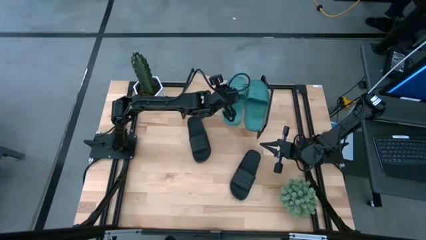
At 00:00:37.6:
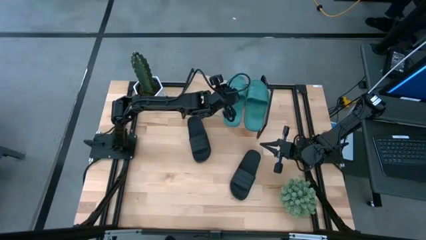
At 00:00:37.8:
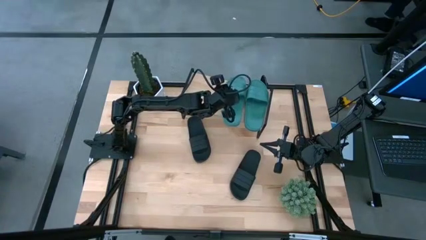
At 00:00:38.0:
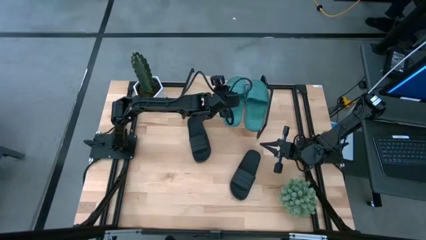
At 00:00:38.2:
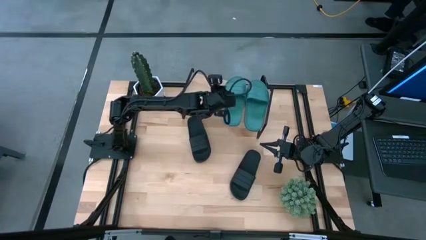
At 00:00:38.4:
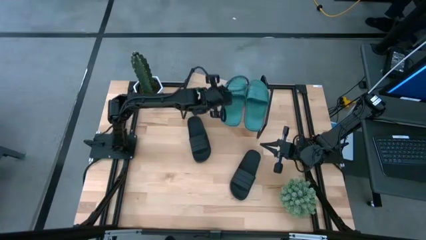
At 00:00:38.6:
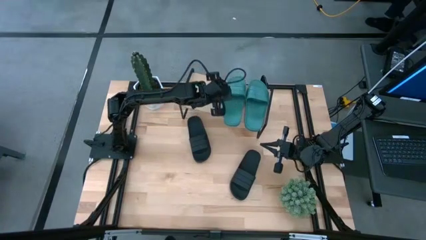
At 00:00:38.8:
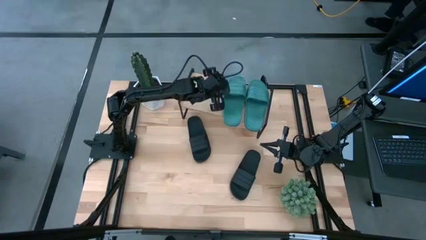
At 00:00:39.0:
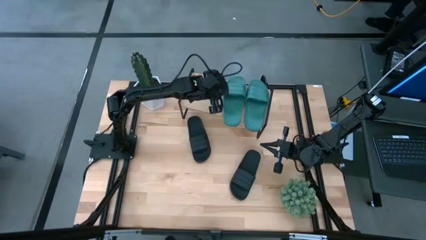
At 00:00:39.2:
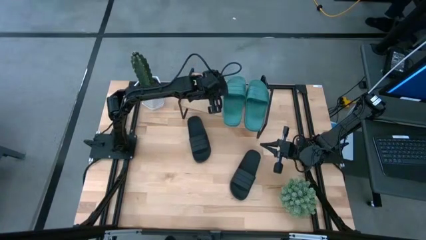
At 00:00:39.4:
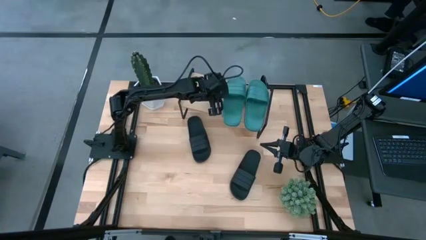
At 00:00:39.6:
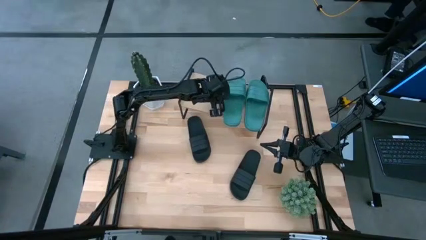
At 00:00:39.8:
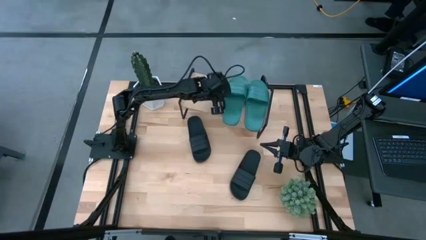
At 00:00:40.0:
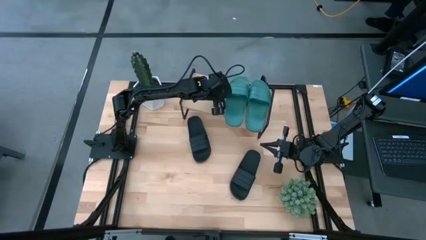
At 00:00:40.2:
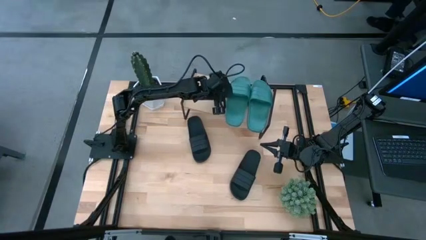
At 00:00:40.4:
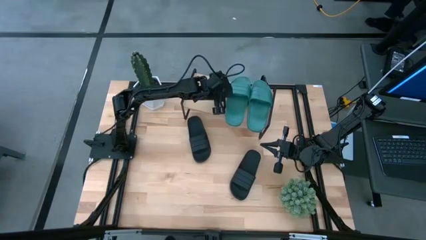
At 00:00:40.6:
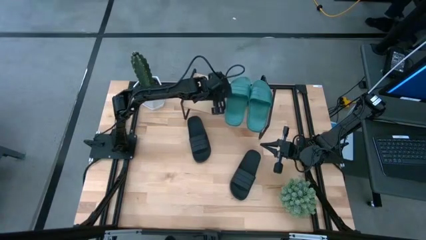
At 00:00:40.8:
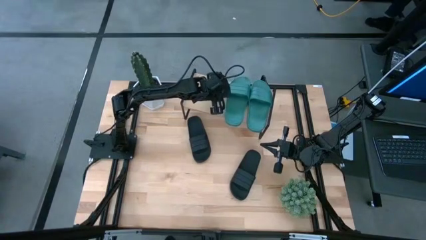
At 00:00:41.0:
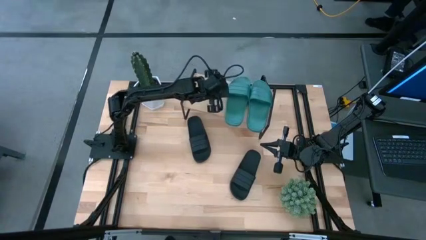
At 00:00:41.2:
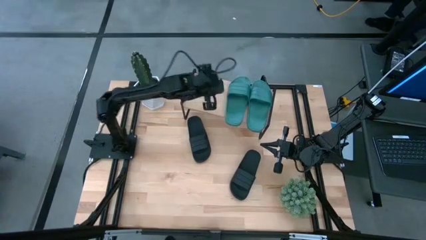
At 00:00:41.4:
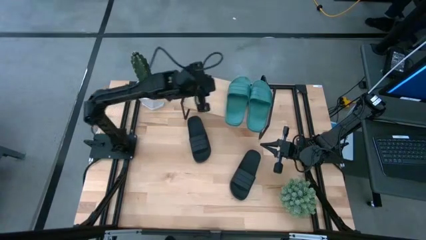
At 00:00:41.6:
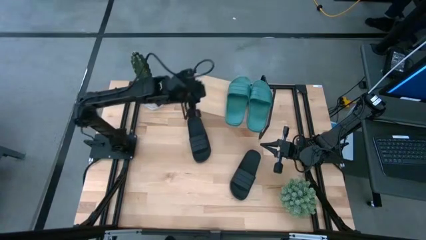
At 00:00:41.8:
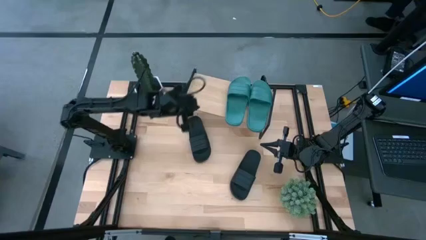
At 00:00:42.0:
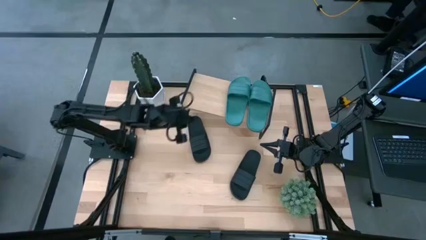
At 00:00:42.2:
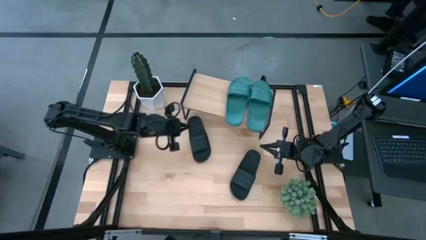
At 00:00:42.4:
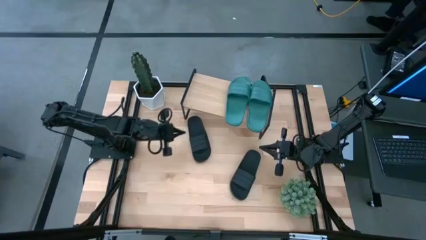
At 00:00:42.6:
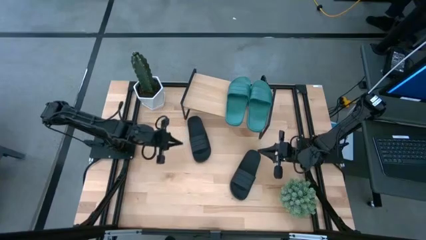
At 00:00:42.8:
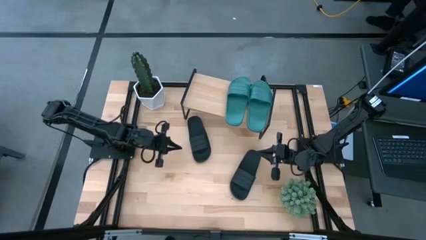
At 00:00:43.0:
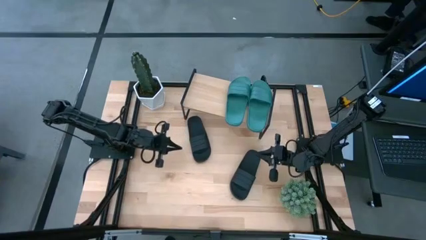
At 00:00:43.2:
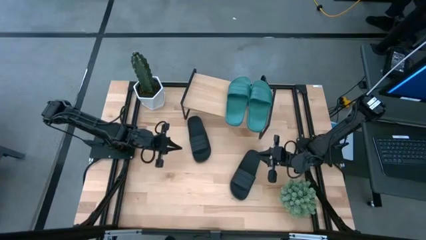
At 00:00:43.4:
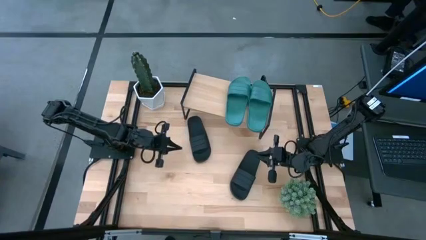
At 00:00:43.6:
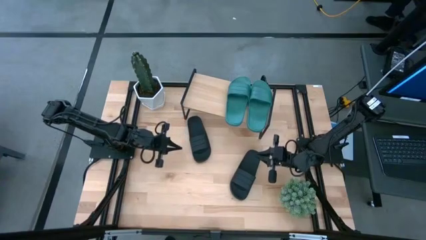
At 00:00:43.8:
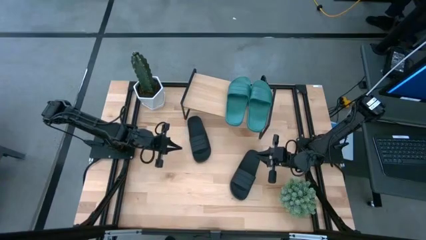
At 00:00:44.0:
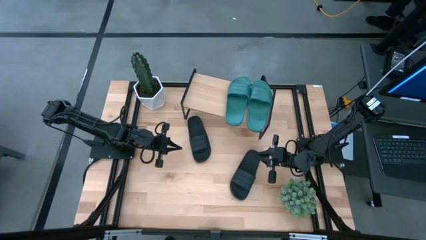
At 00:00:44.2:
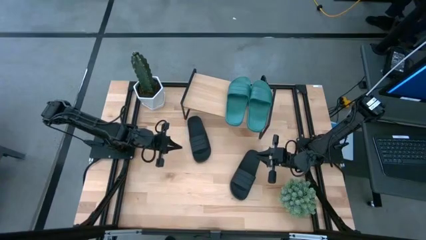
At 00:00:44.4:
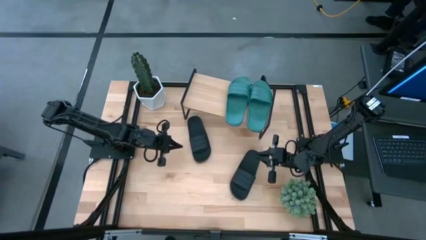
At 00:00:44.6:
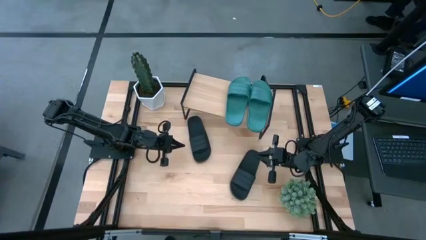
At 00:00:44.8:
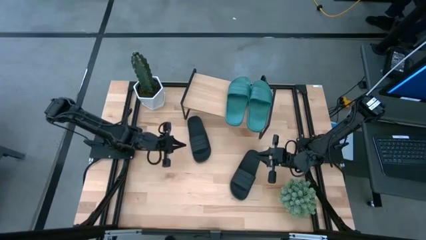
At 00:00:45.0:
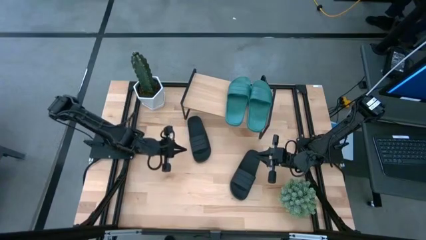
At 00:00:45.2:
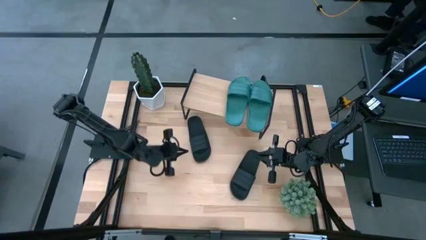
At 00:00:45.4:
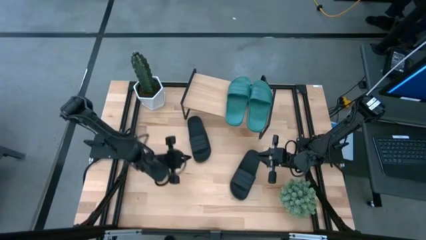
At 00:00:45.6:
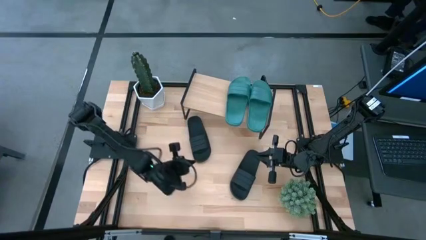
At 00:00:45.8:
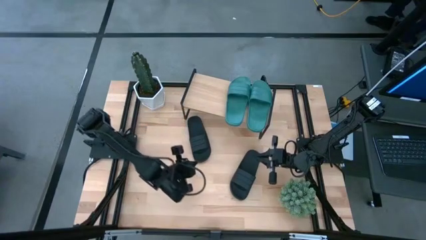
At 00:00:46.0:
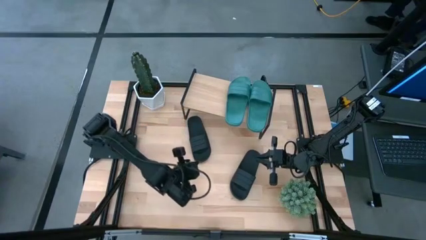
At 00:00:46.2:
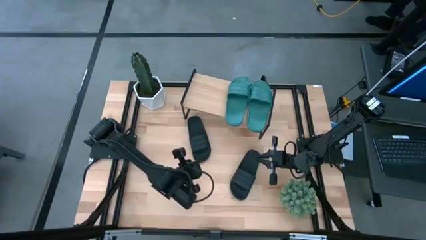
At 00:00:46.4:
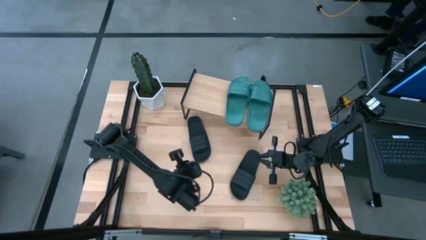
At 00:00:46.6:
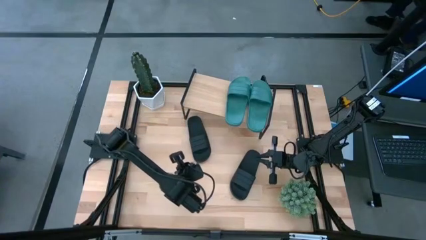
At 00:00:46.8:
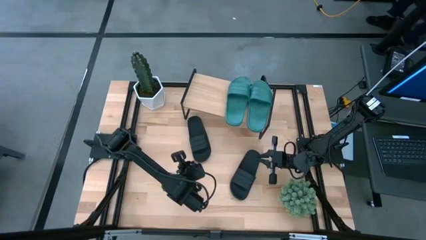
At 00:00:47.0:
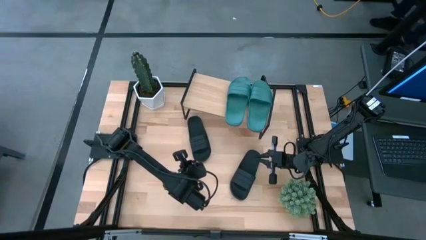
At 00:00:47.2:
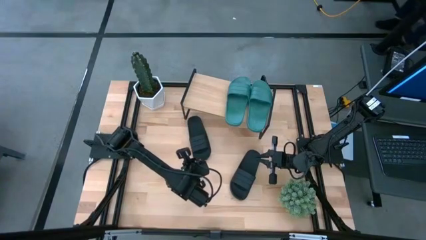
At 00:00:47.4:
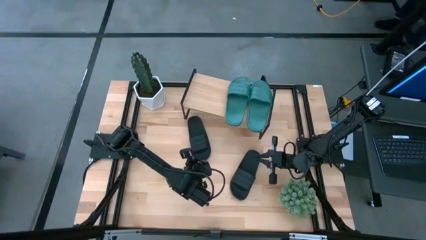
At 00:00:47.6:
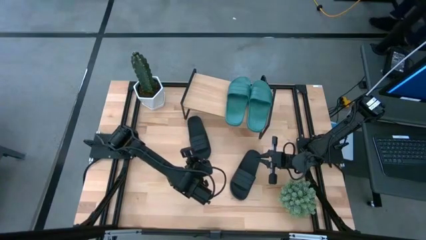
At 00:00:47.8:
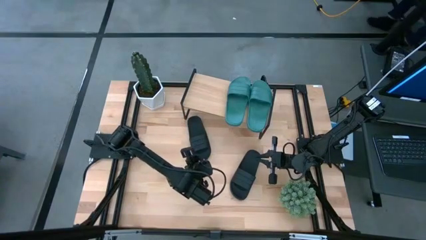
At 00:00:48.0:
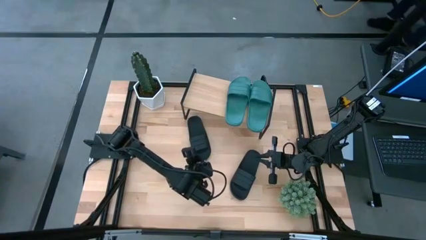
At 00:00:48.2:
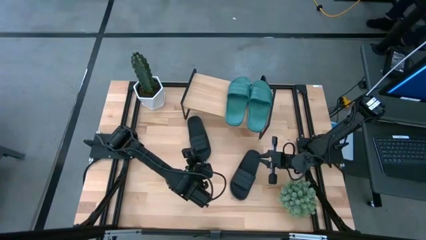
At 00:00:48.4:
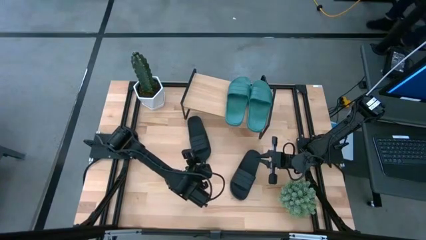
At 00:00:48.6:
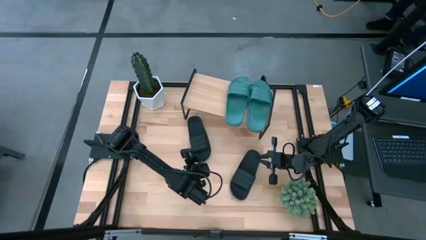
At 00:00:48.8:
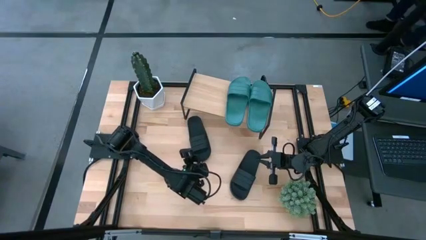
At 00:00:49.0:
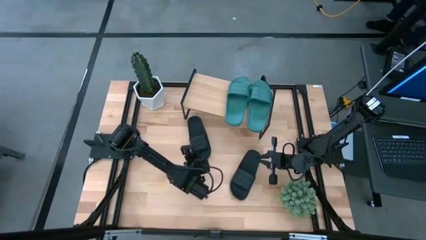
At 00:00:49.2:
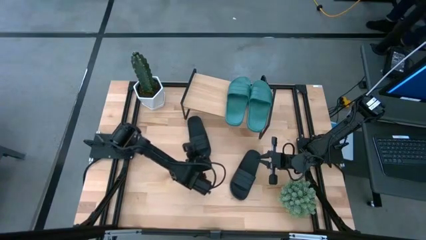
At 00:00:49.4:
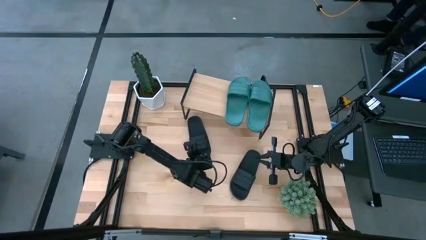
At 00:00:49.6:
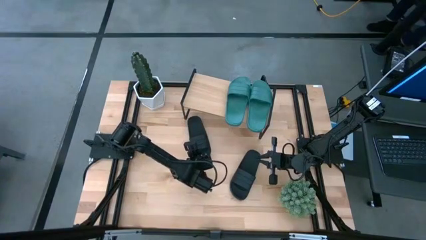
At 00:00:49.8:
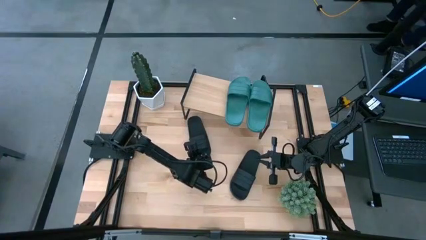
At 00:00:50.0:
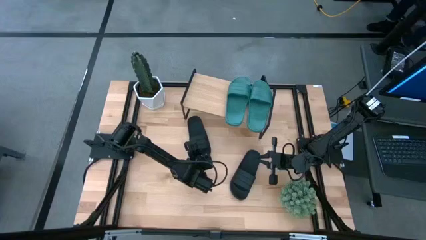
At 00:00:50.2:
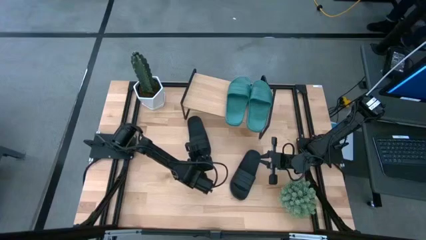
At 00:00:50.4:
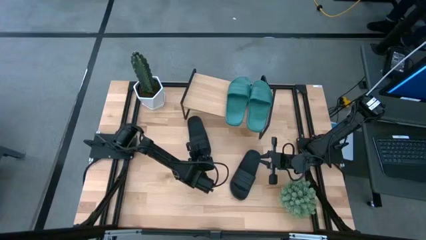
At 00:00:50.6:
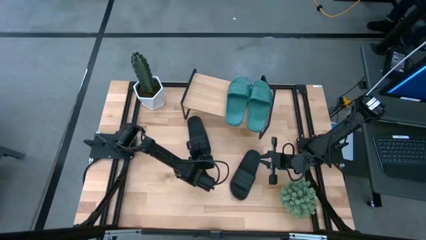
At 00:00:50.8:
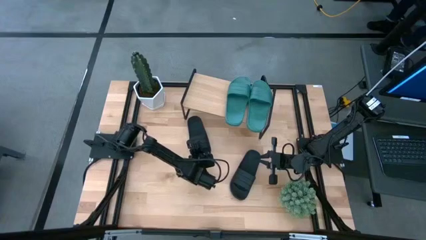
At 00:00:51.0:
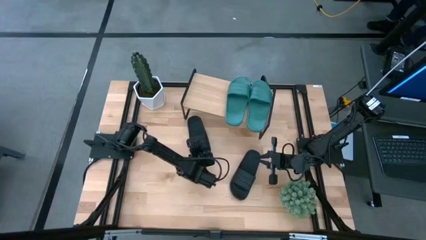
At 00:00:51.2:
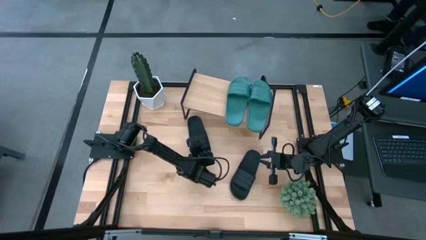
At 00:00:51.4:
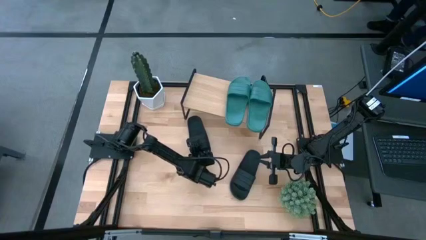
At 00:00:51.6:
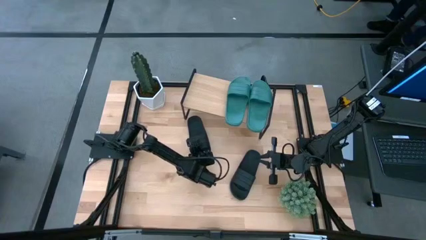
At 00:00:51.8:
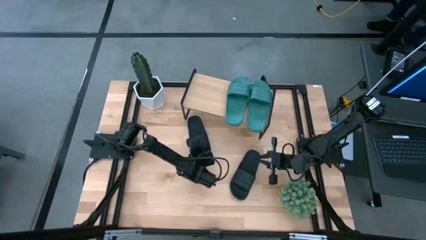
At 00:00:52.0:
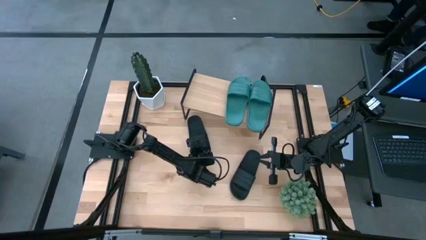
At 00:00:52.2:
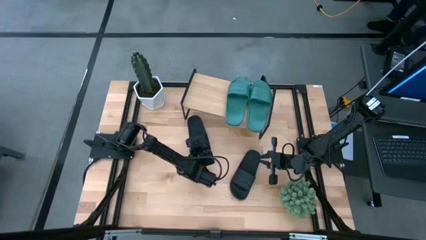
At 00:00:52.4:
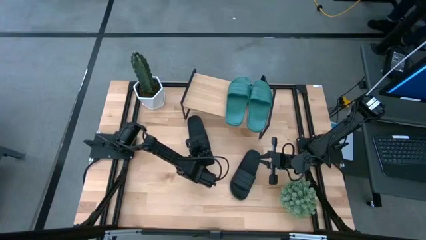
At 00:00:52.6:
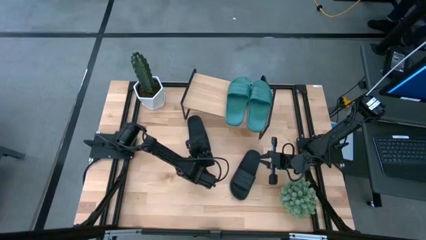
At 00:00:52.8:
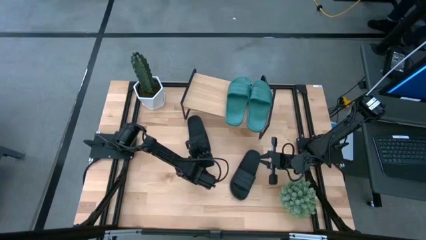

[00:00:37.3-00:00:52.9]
Task: Pick and place slides into the shelf
Put the left black slide on the shelf

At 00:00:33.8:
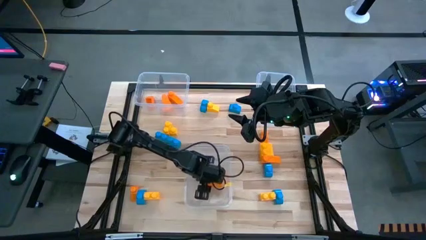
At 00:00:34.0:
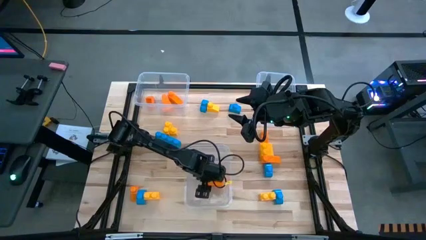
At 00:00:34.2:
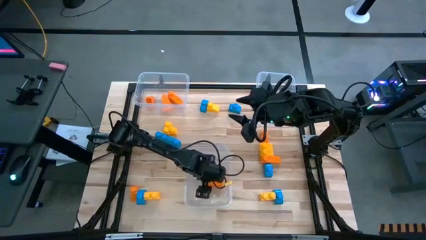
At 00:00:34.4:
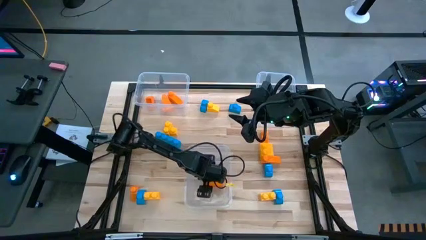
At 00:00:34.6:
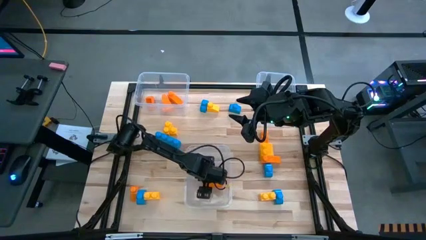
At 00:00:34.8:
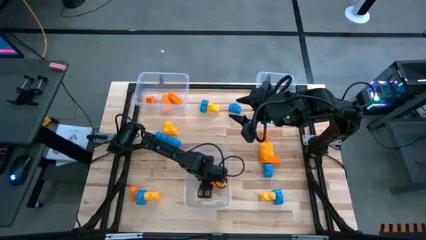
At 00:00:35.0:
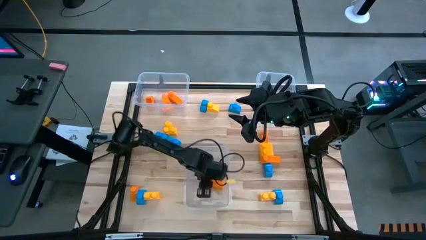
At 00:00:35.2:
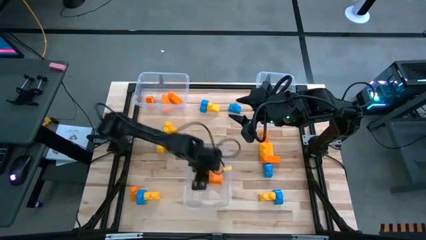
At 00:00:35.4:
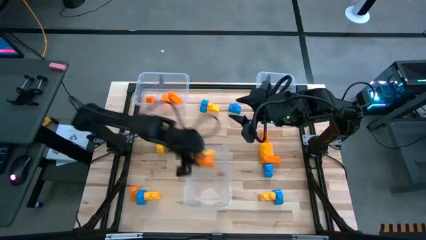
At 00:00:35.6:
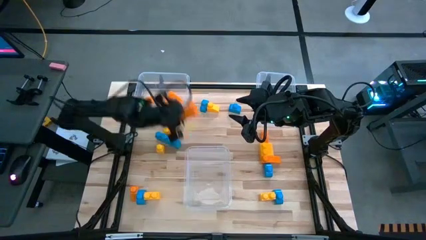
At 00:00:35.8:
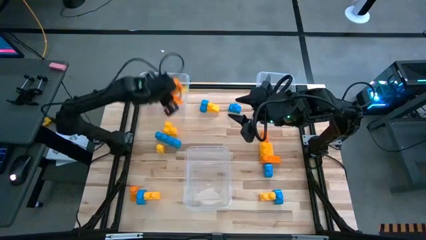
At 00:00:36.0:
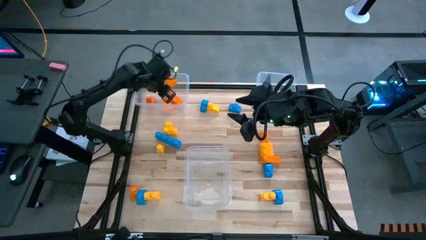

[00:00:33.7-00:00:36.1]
Task: Sort blocks
Put the orange game piece into the top left transparent bin
